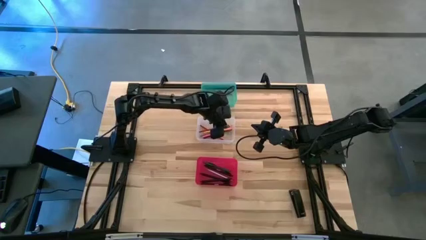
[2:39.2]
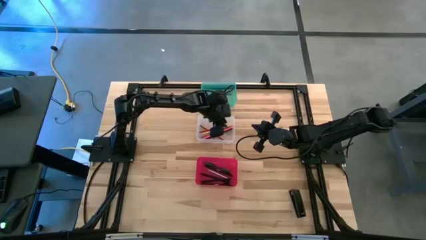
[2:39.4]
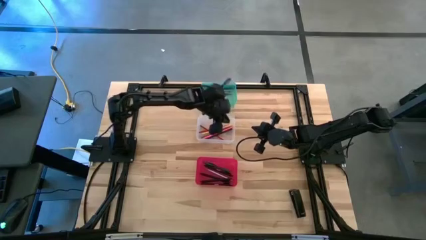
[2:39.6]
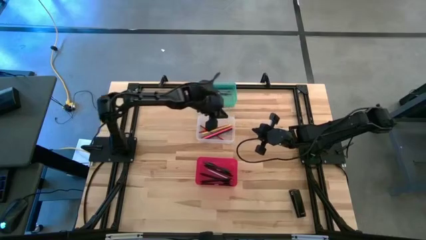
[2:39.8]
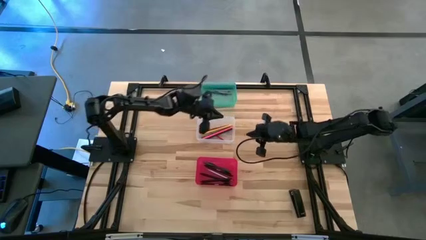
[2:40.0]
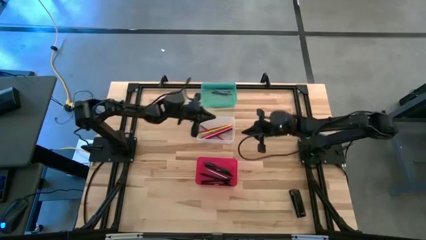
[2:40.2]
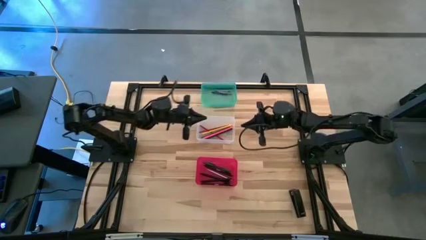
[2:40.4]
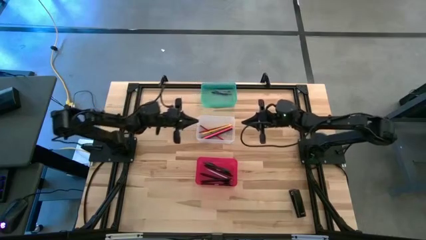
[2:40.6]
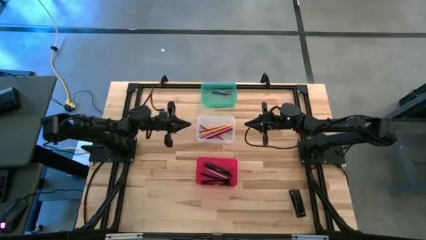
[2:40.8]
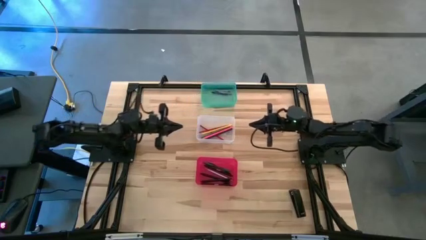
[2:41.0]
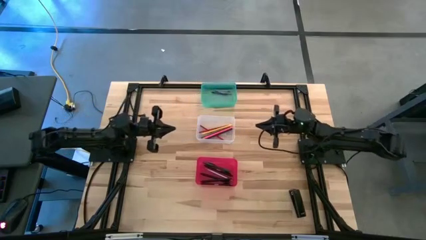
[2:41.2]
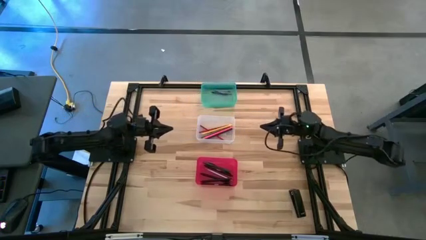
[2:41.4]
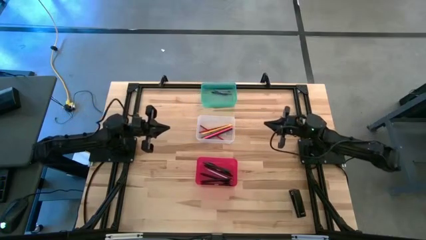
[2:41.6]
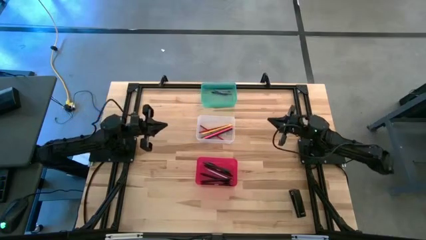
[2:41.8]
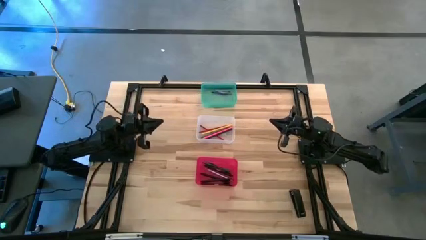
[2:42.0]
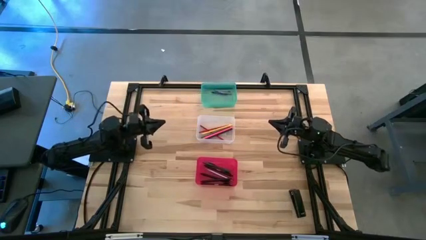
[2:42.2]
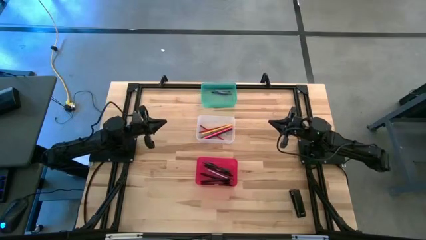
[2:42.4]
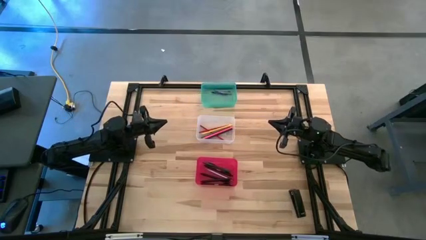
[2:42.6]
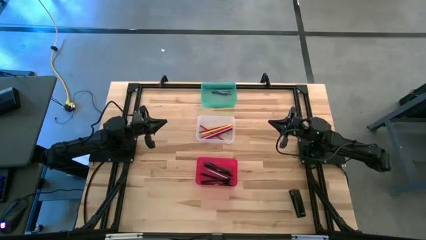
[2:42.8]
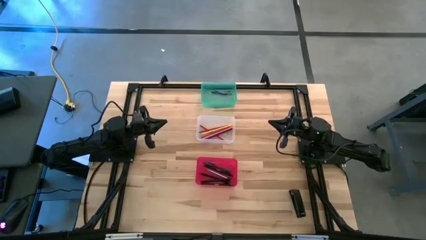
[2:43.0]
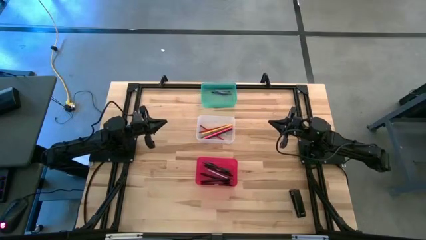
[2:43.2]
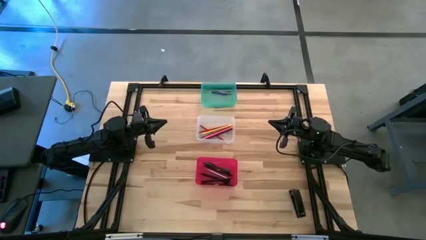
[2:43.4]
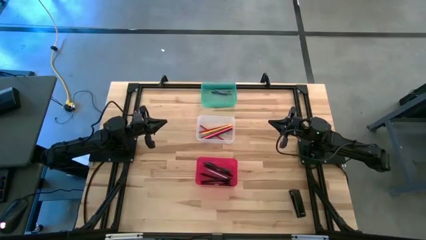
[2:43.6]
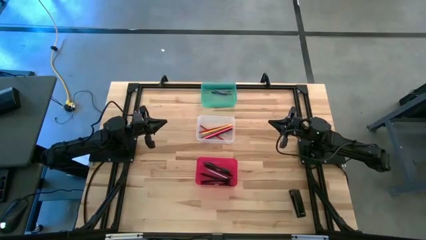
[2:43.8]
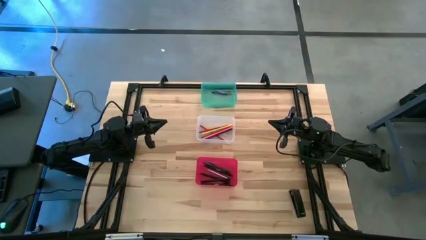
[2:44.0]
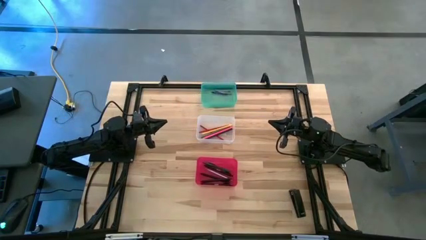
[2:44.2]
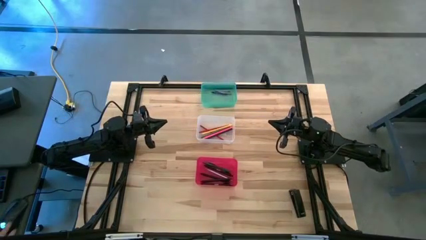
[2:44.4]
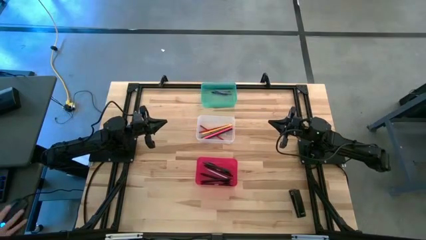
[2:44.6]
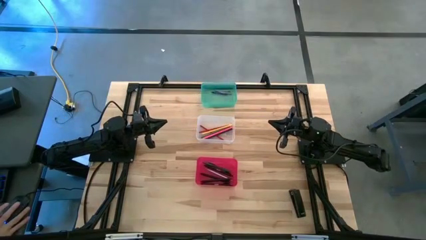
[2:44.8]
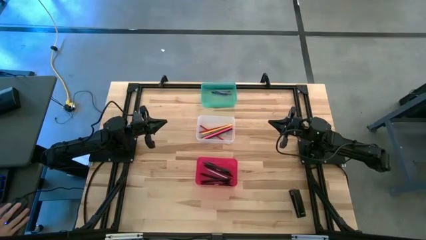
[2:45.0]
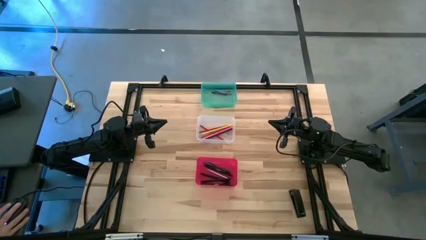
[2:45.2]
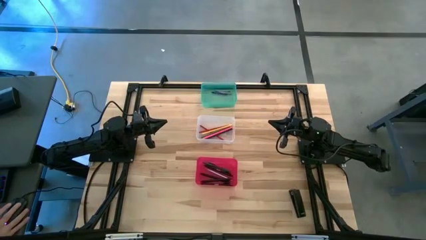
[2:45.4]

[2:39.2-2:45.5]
Task: Sort crayons/erasers/pens/pencils in bins
Return to Home Position

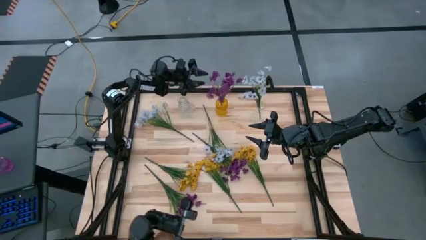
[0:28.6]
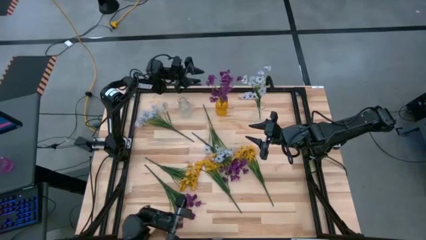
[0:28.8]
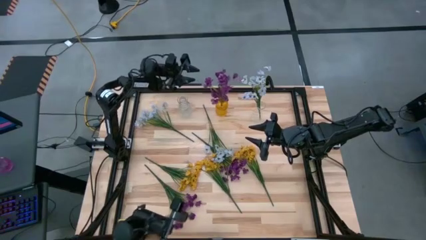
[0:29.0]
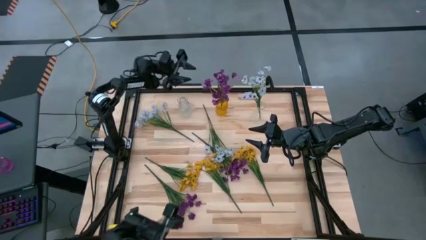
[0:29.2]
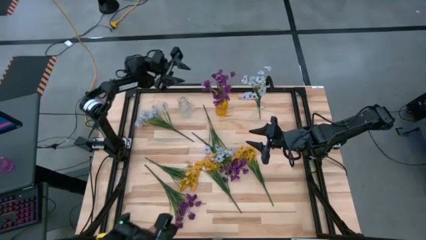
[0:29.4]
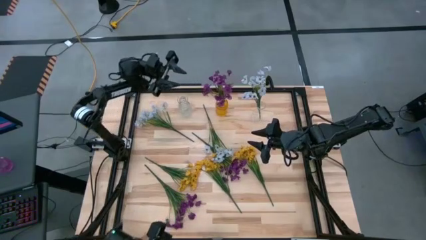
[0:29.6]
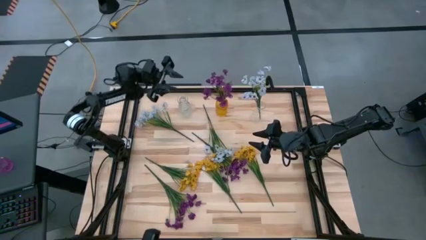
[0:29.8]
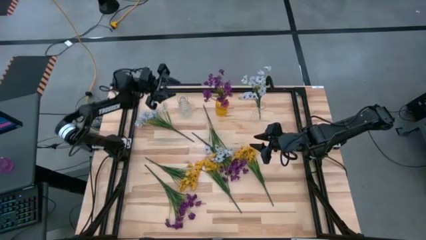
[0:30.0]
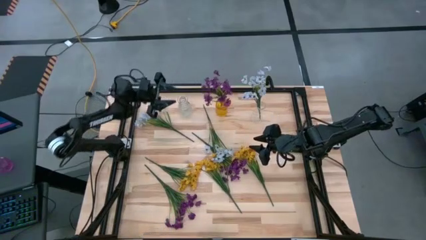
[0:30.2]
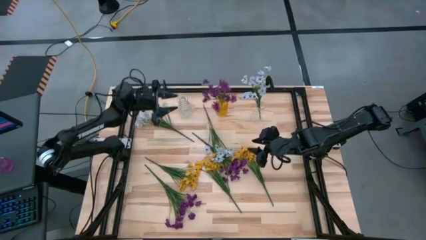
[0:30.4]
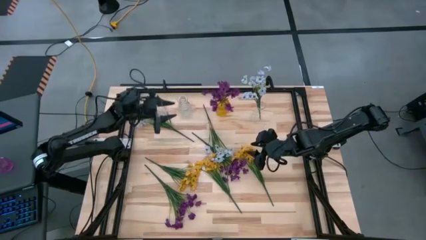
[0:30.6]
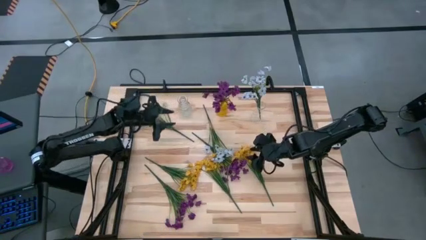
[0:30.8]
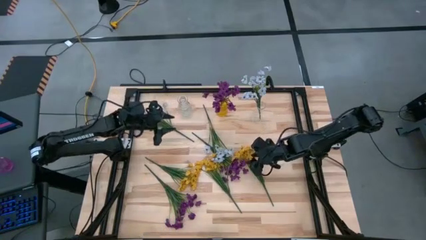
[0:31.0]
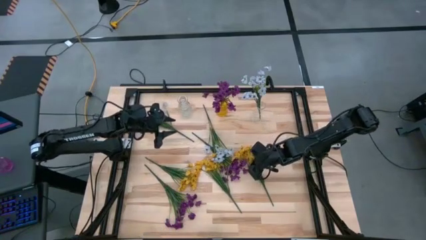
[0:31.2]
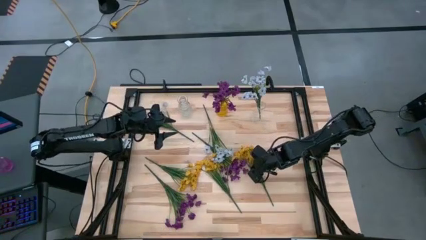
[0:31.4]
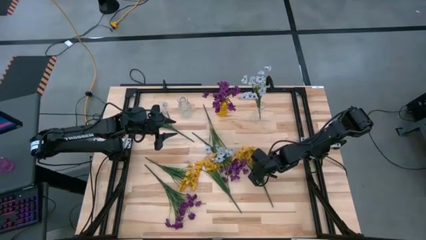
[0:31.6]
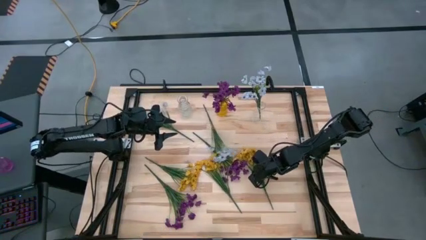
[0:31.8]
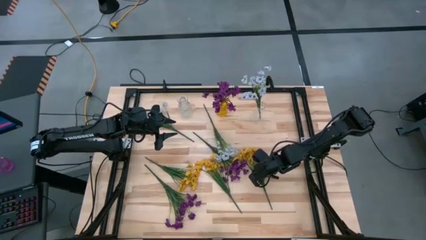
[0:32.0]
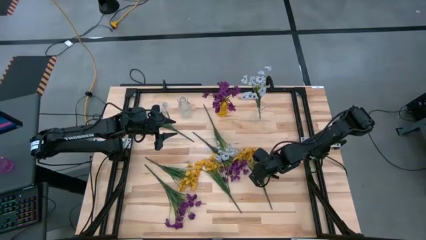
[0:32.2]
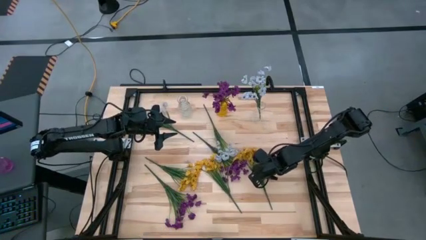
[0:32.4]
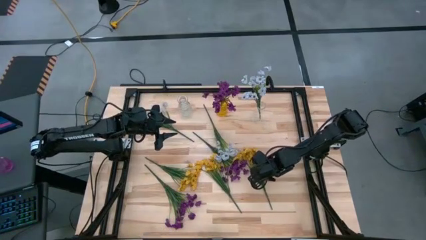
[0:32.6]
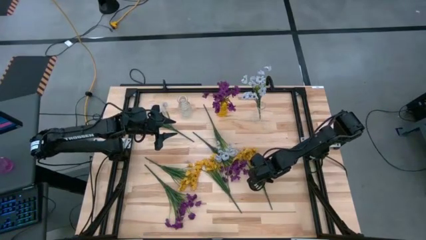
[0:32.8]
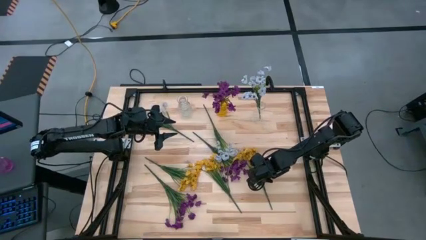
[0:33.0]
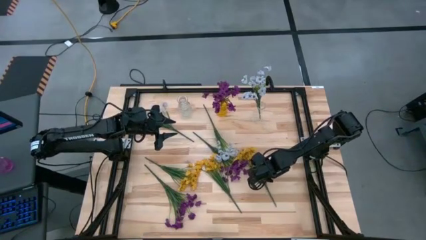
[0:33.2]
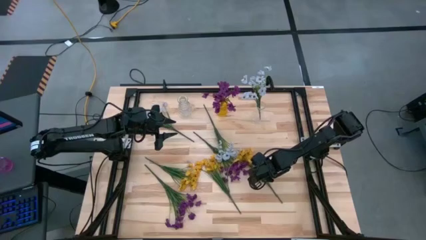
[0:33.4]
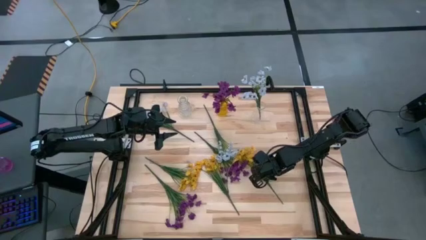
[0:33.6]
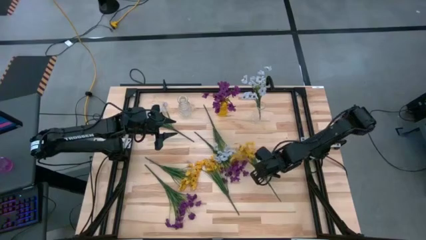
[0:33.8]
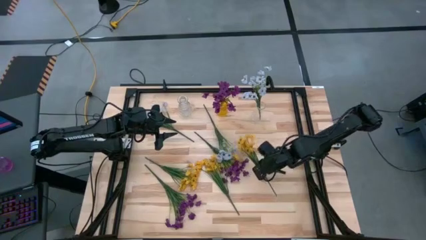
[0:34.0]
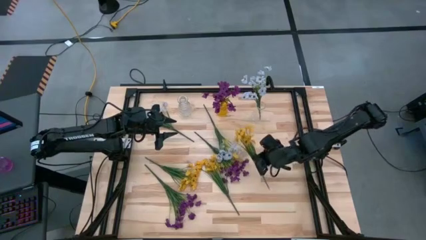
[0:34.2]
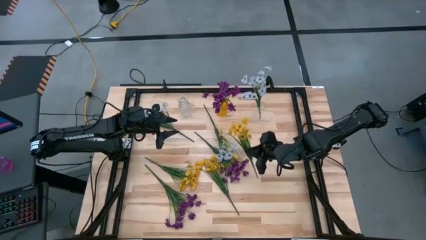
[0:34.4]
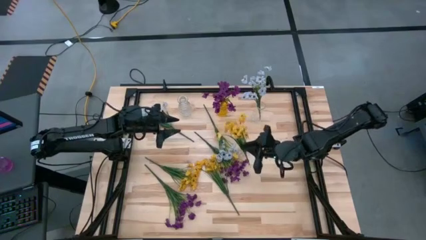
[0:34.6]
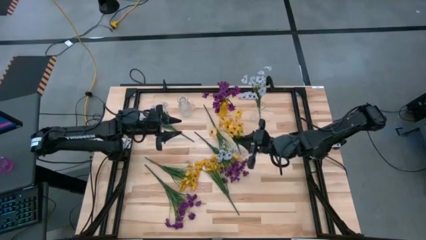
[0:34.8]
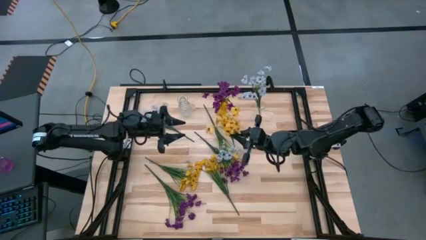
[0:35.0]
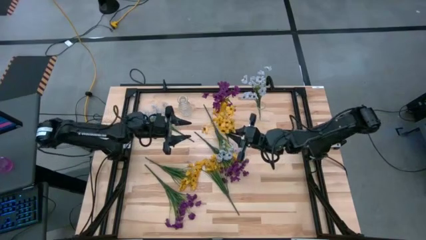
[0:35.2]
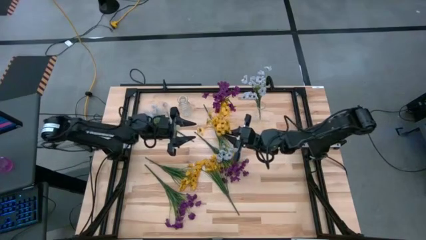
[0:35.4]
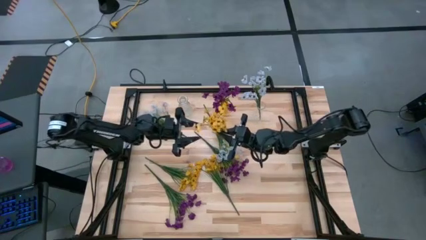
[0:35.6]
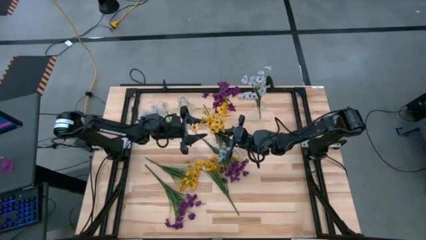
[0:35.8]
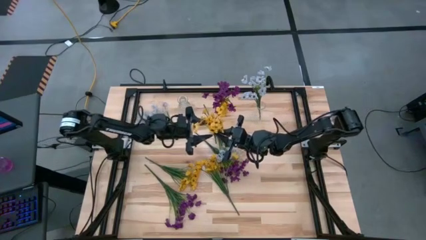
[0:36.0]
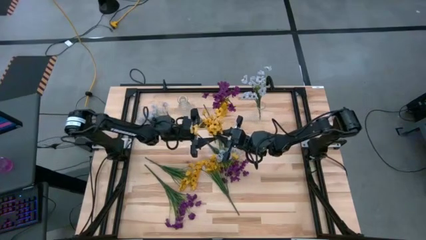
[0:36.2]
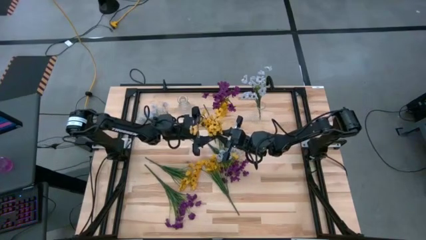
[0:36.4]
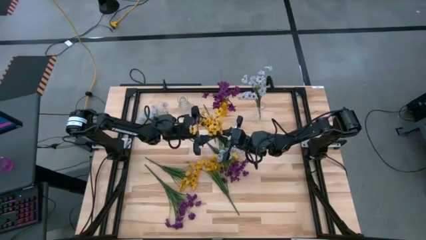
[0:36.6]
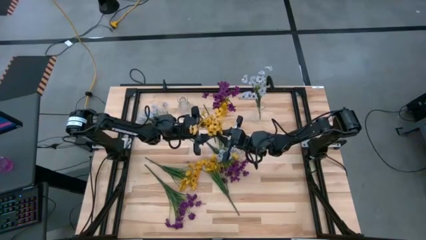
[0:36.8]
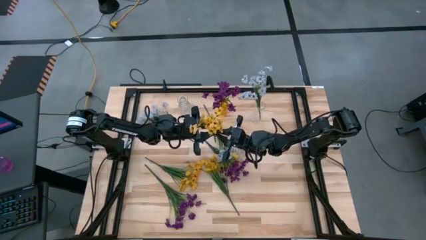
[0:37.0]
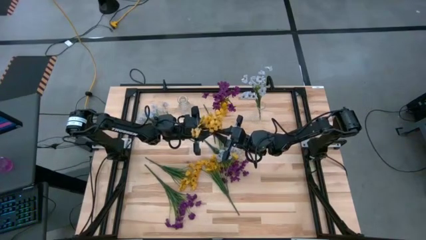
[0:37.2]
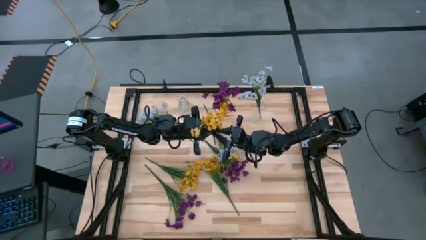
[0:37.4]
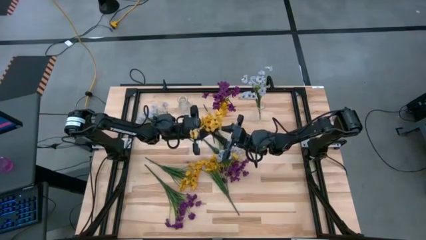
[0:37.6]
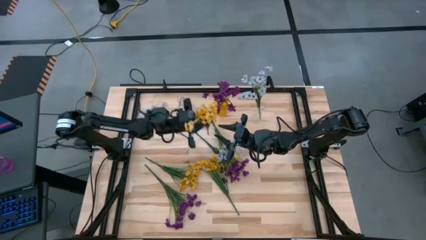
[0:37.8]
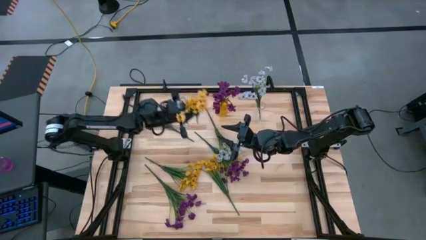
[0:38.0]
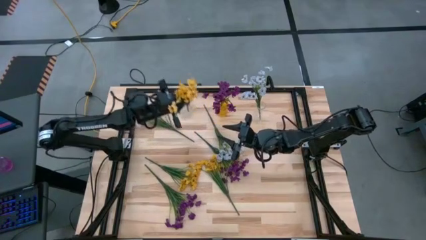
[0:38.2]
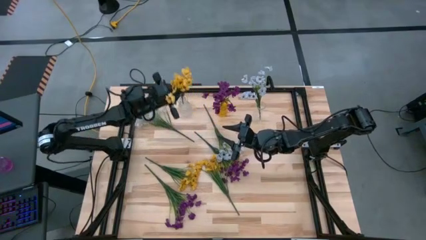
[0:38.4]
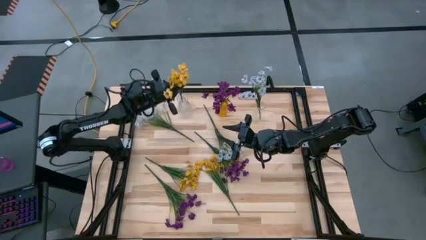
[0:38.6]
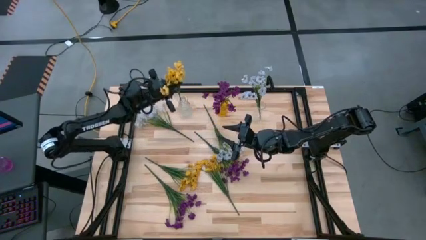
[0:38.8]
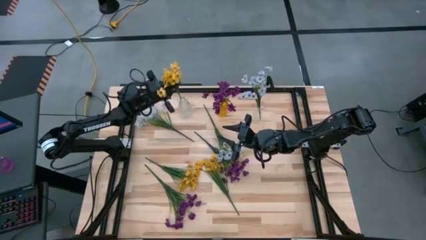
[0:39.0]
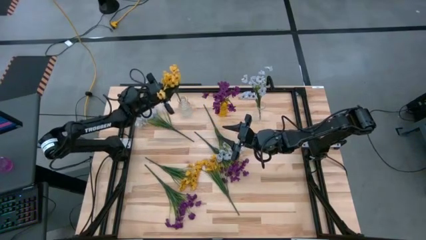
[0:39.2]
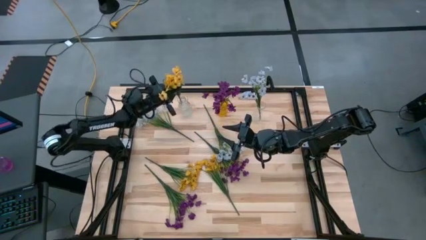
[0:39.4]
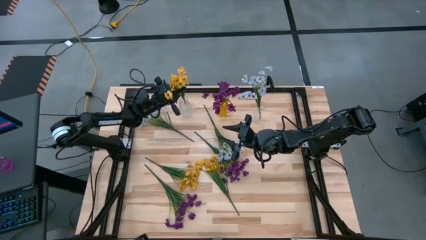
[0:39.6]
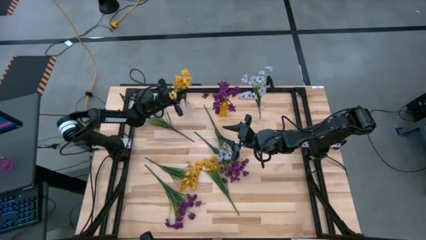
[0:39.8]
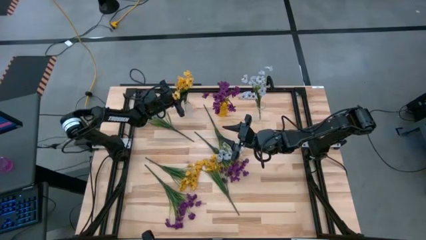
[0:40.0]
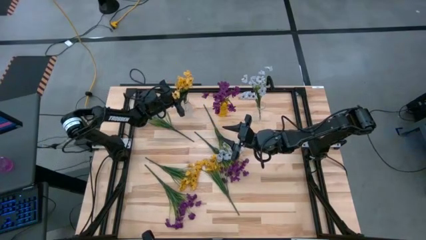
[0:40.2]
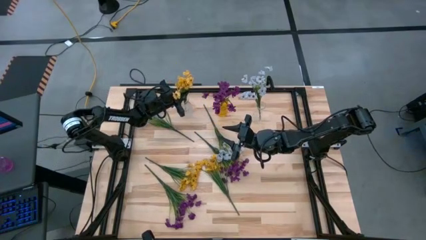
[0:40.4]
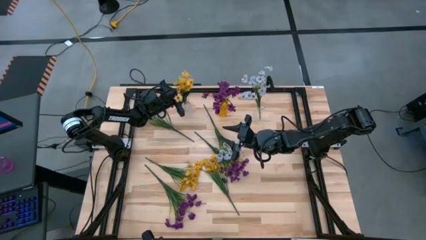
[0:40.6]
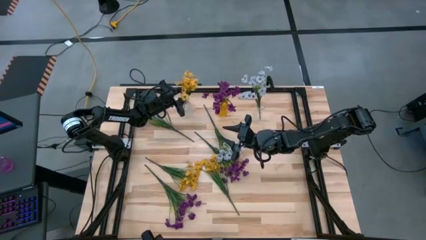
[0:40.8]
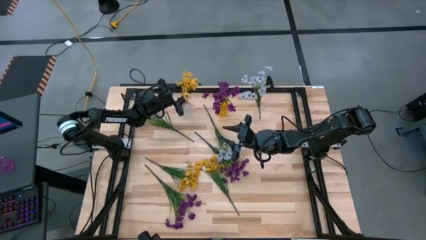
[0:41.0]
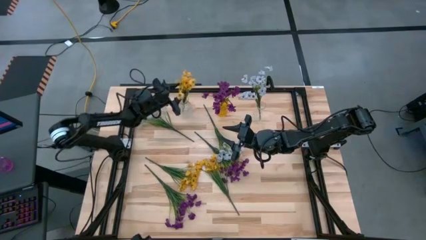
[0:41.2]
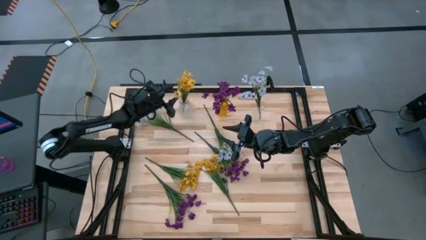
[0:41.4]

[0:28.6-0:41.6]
Task: Sort flowers into vase by color
Put the right yellow flowers into the left transparent vase
